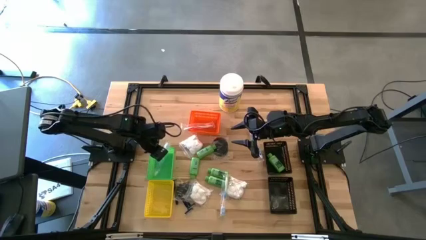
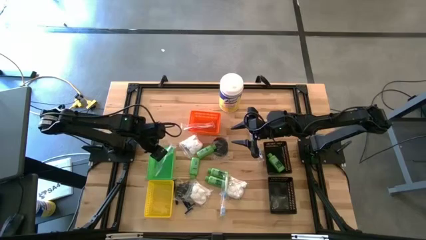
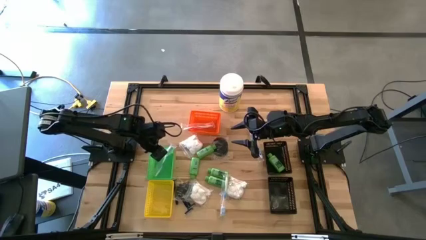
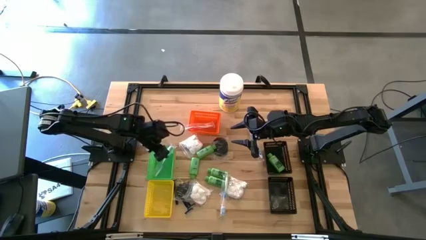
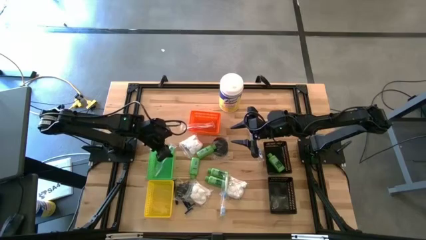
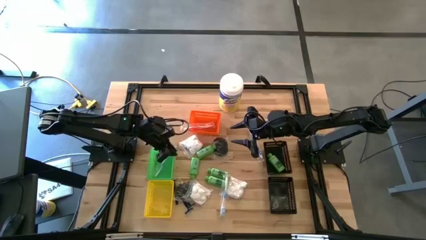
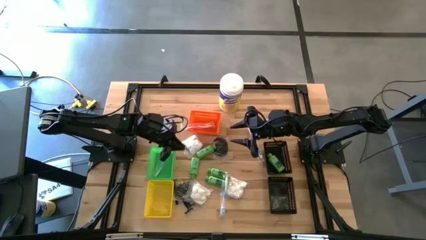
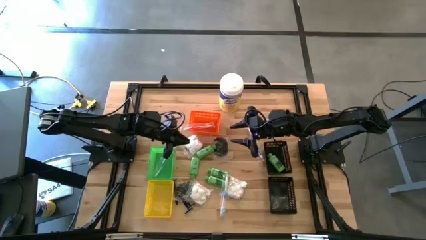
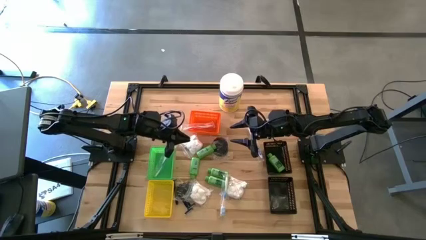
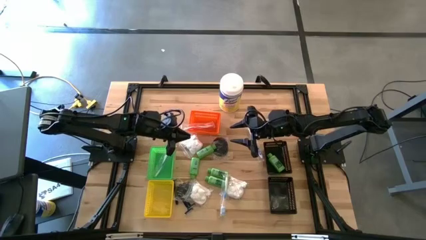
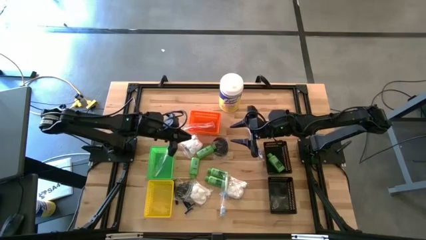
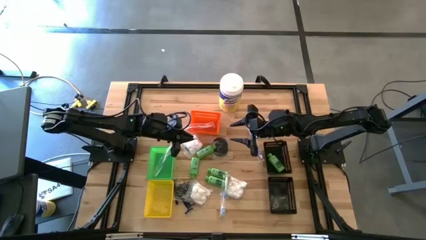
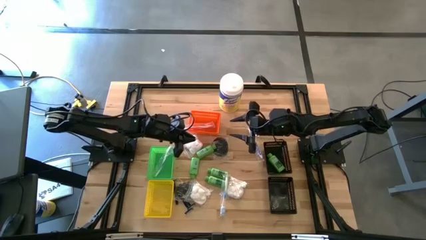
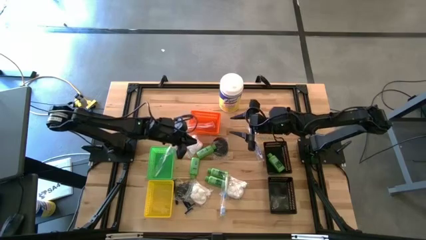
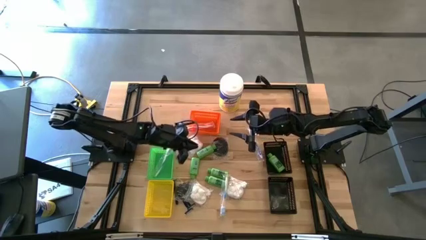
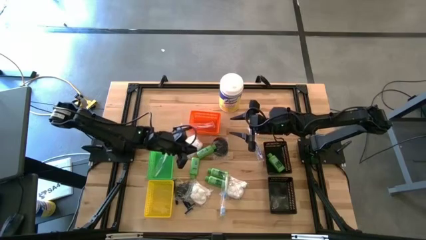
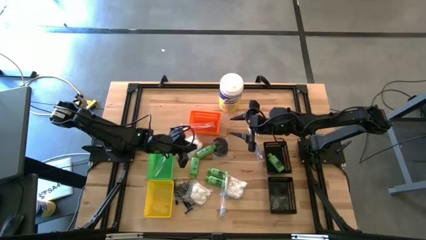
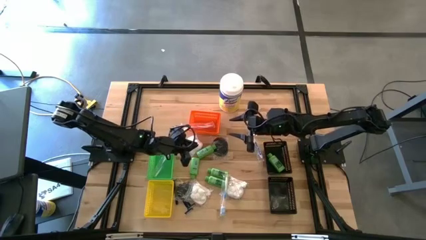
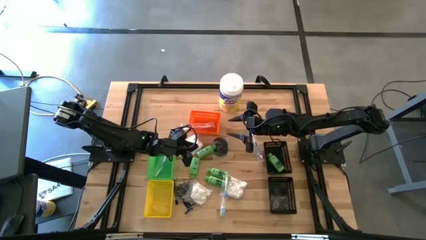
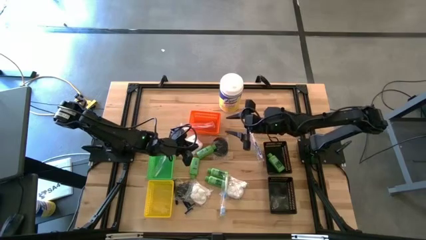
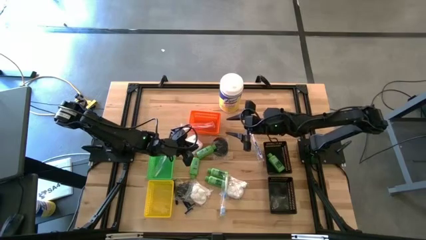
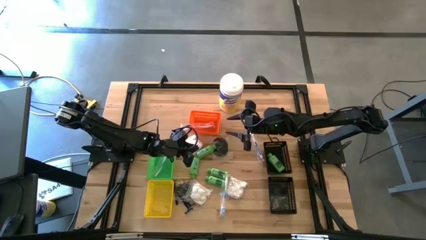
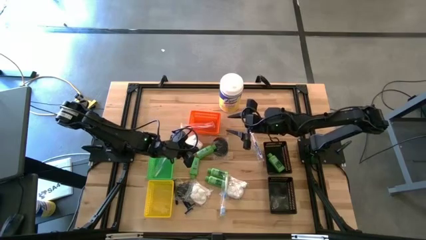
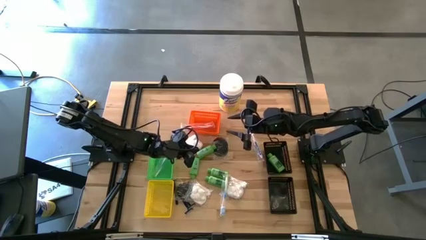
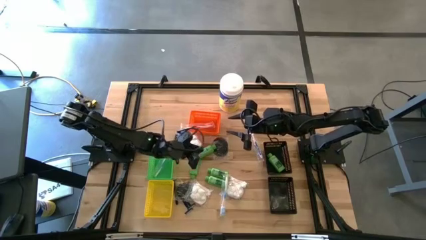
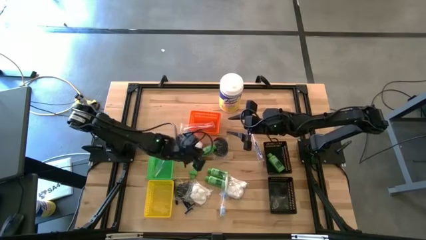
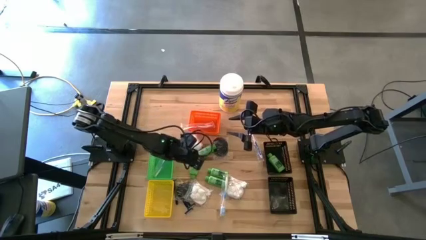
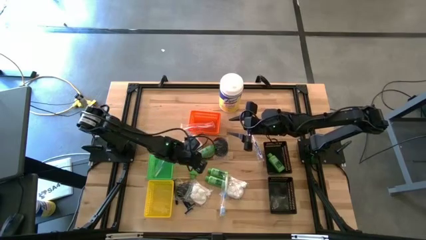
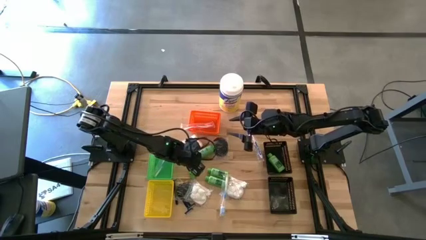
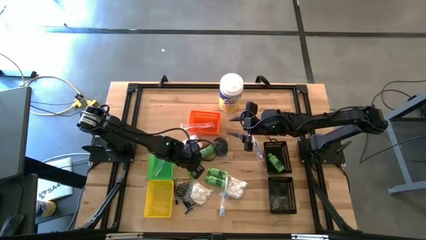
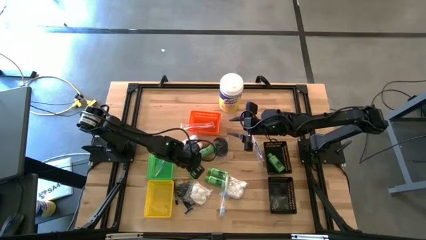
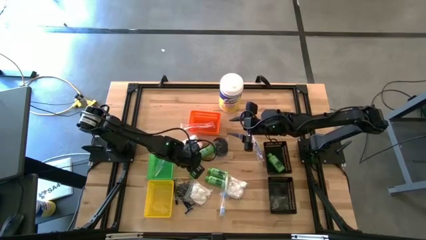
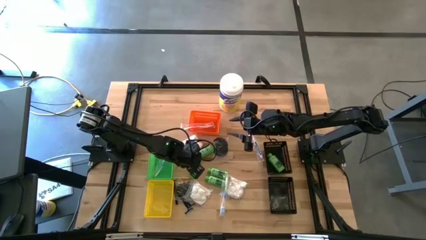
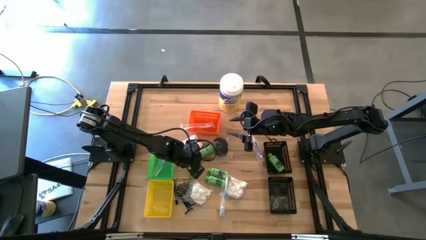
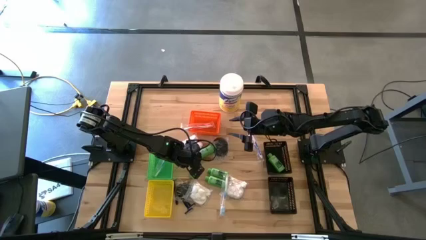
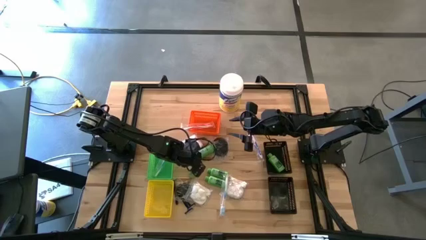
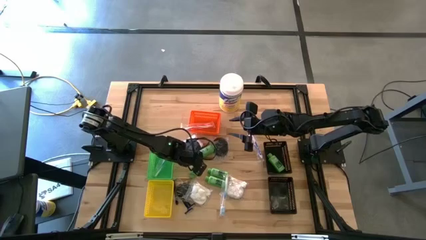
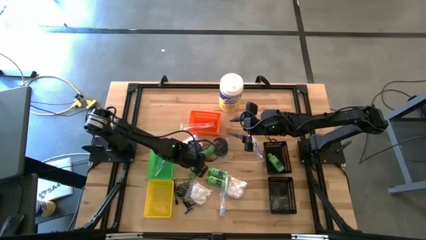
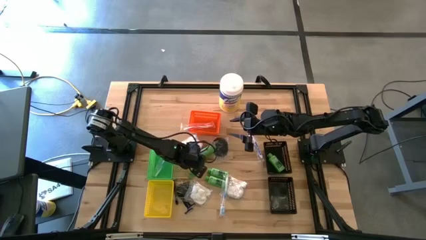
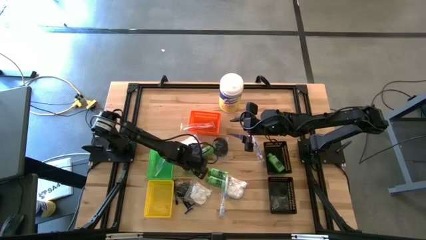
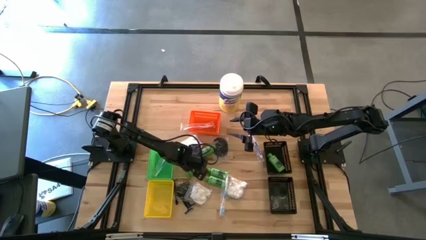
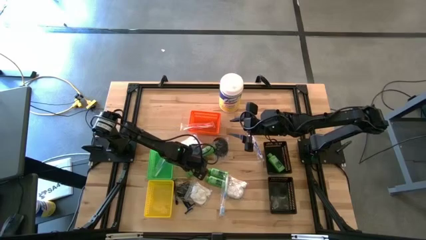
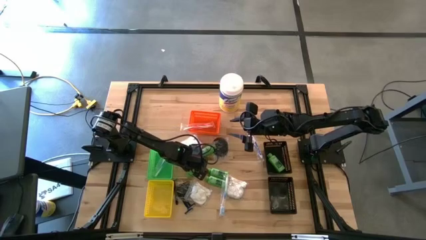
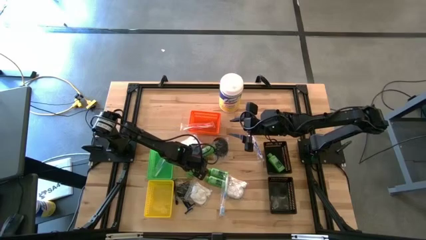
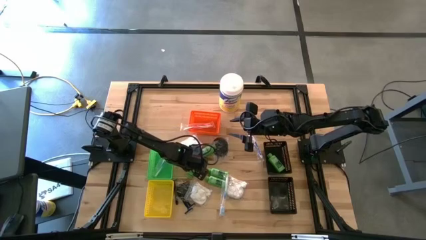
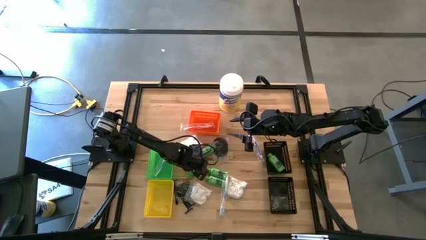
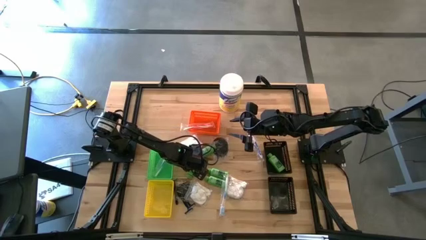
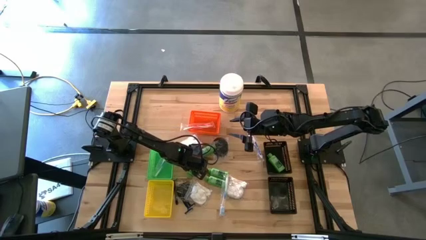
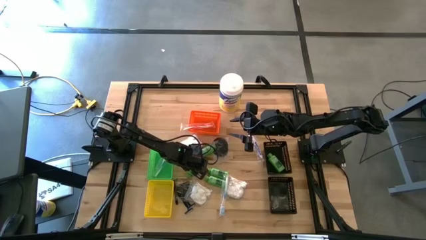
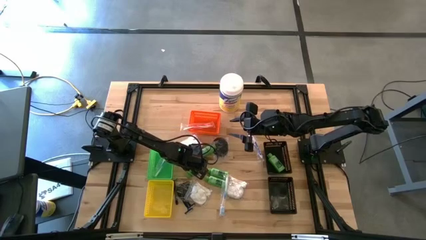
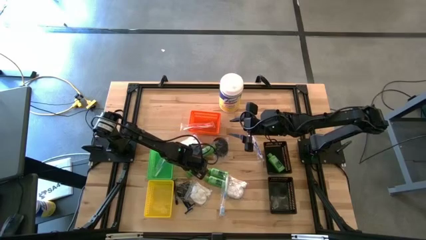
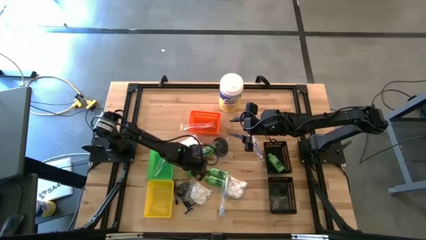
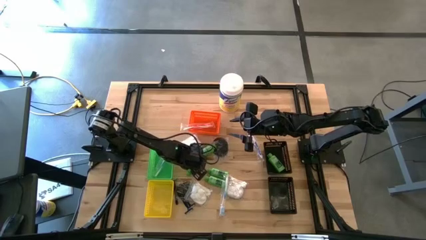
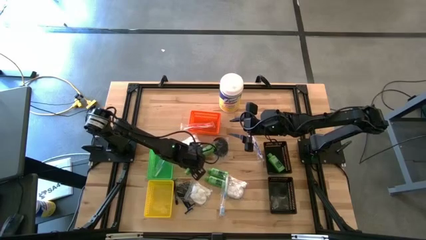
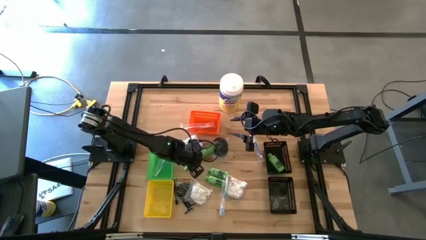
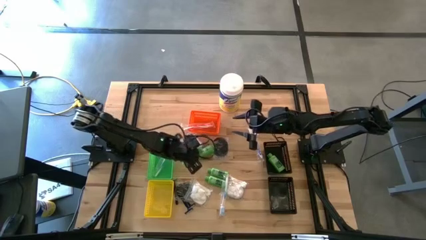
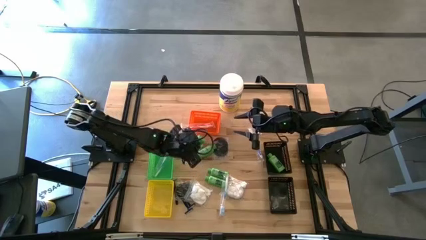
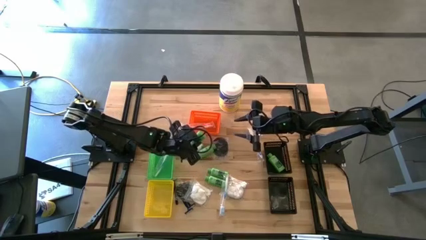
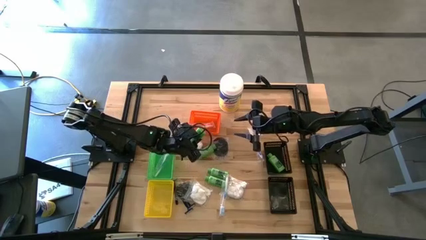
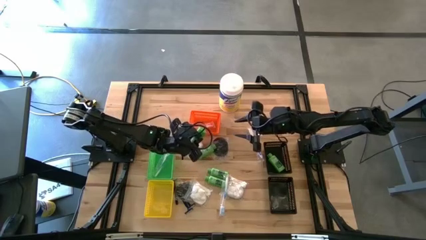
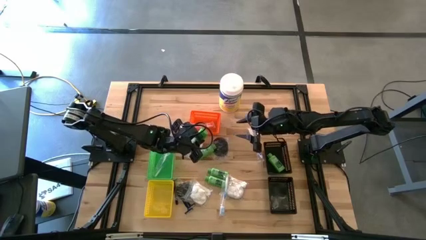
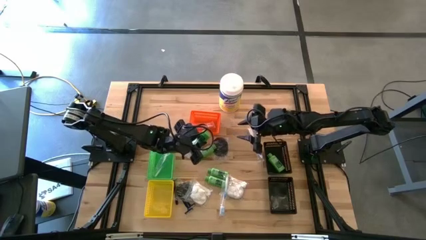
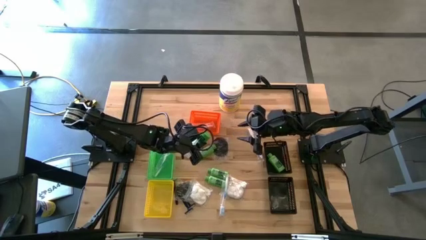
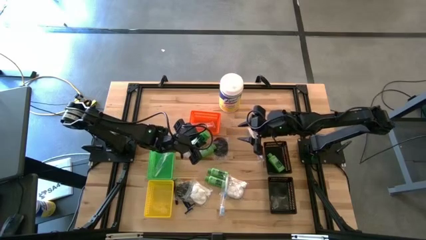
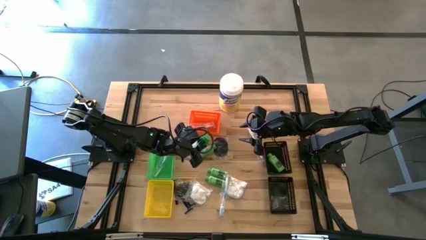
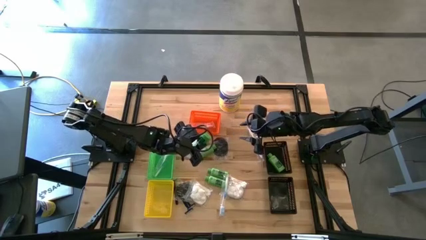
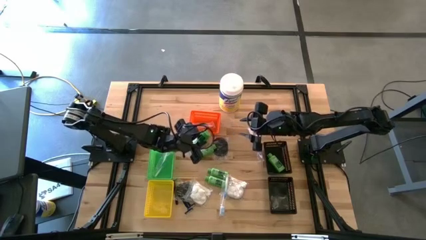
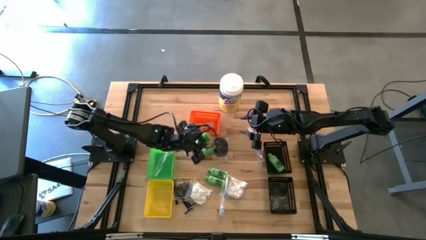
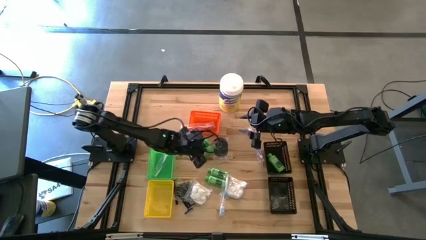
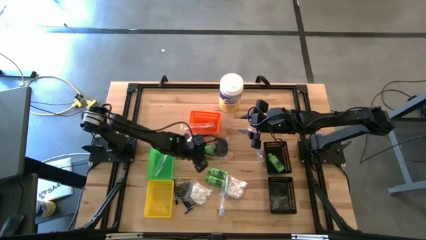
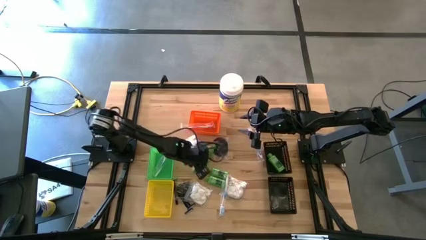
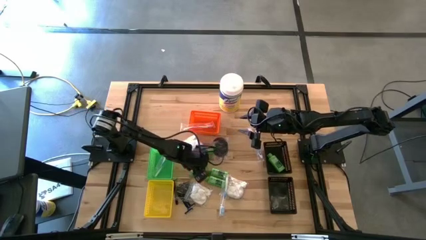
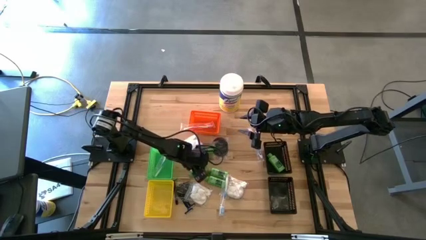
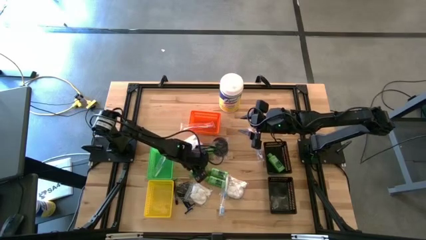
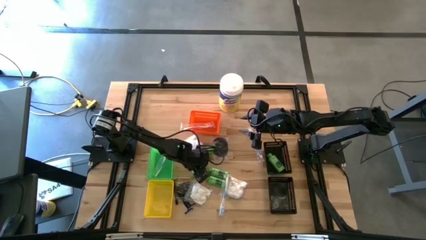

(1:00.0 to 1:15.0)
Task: Pick & Place Travel size toiletries
Put the green shampoo into the top black bin
